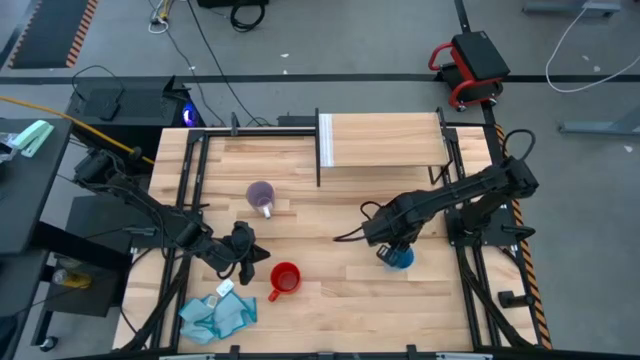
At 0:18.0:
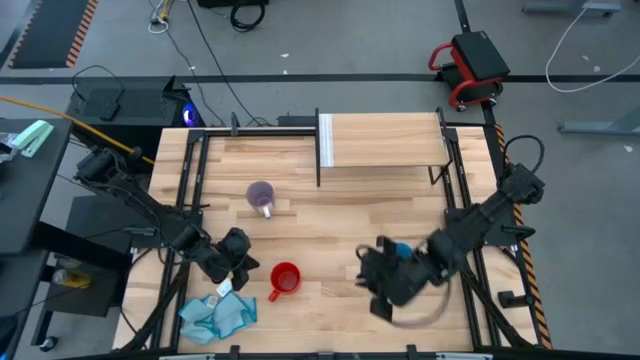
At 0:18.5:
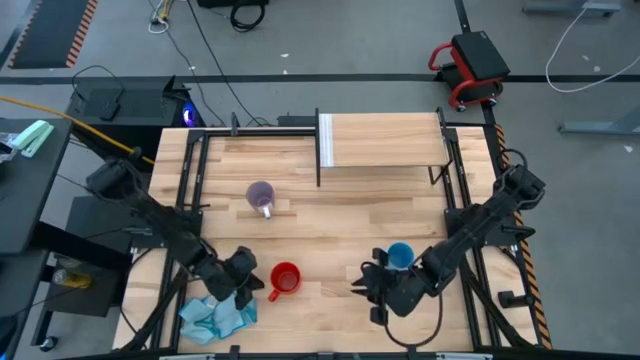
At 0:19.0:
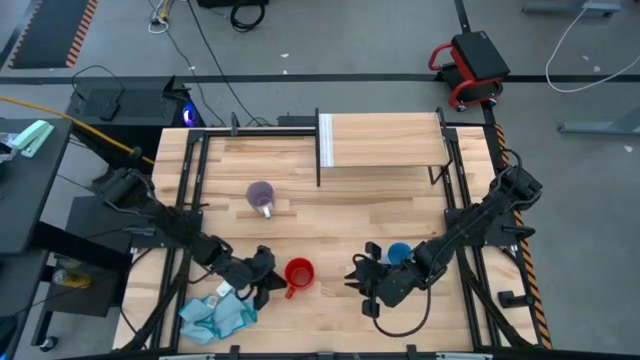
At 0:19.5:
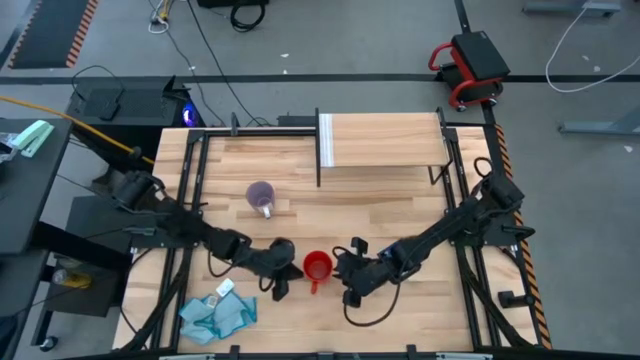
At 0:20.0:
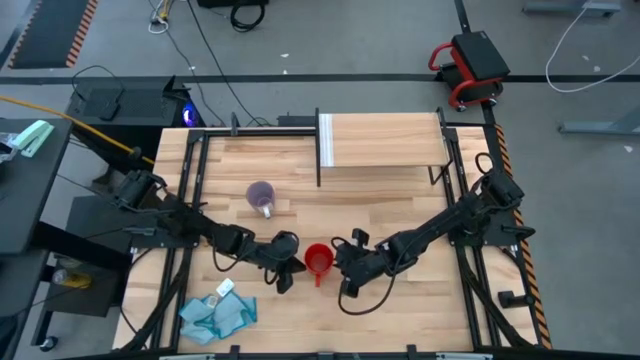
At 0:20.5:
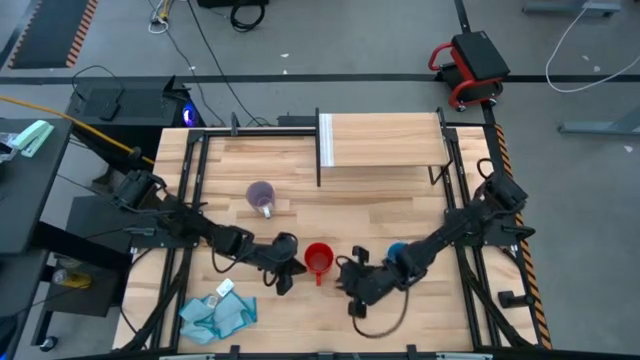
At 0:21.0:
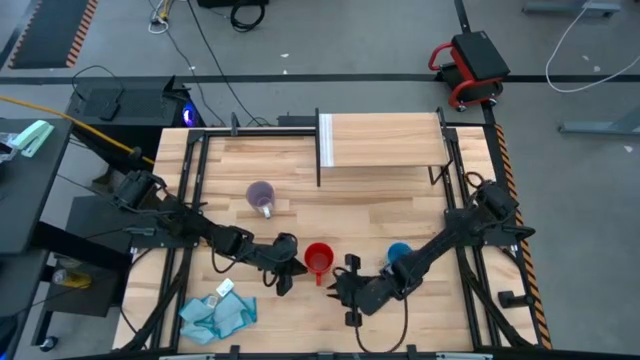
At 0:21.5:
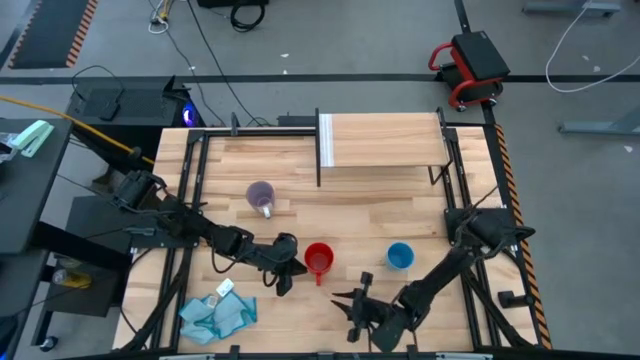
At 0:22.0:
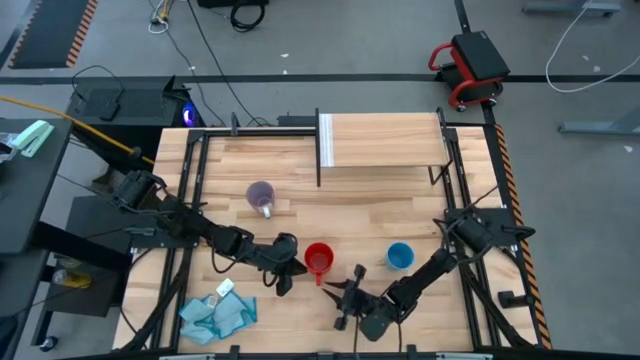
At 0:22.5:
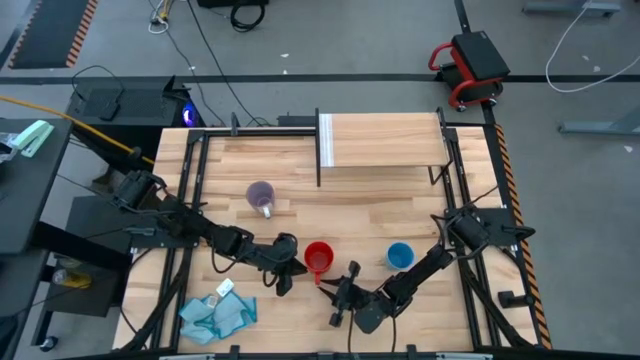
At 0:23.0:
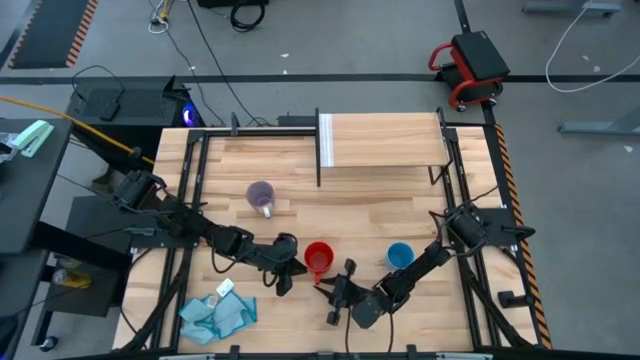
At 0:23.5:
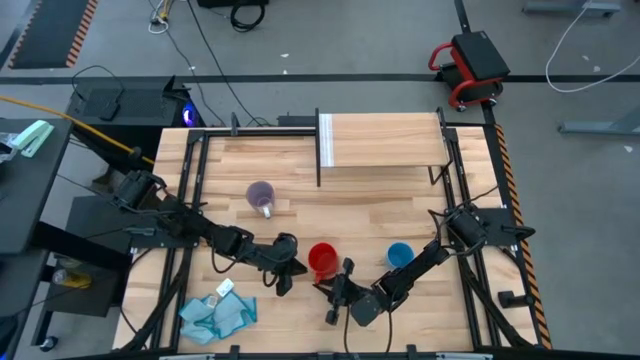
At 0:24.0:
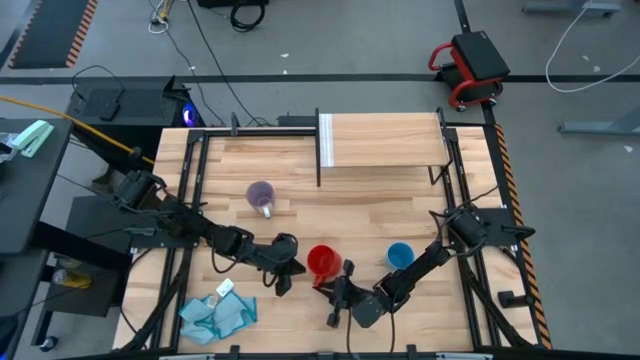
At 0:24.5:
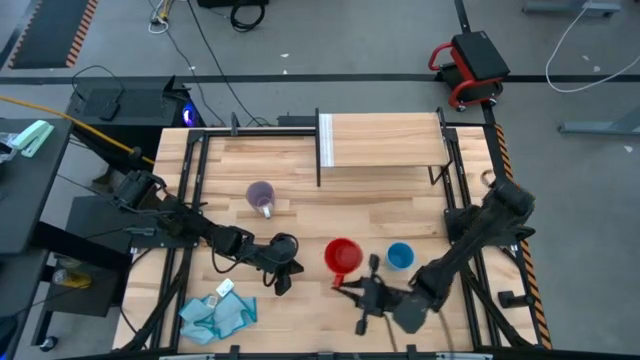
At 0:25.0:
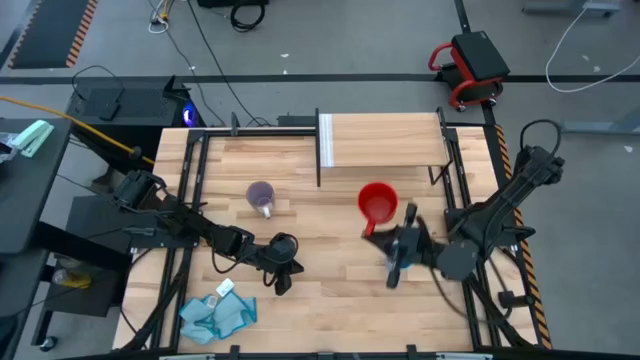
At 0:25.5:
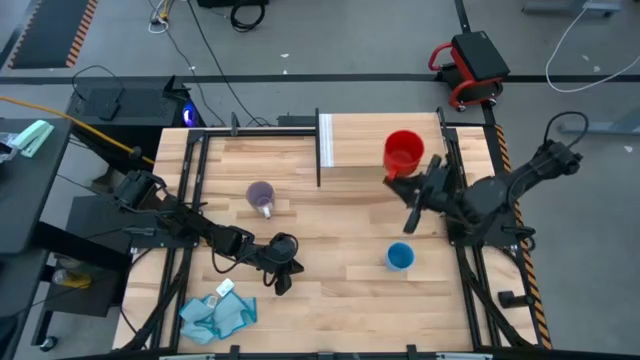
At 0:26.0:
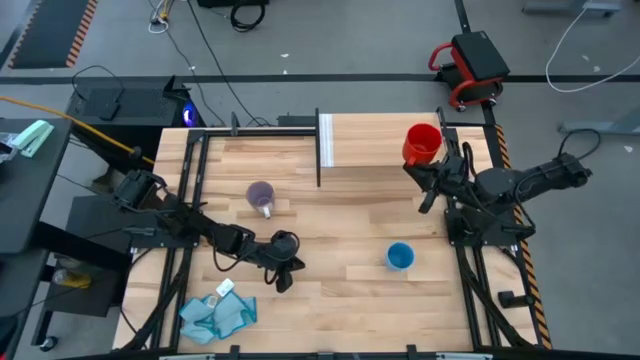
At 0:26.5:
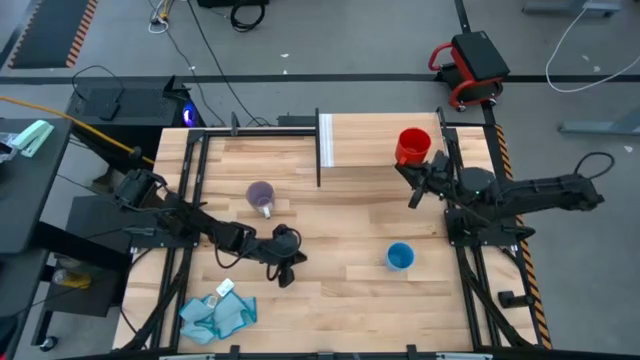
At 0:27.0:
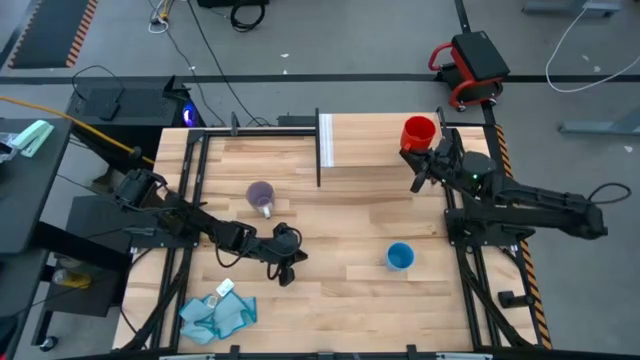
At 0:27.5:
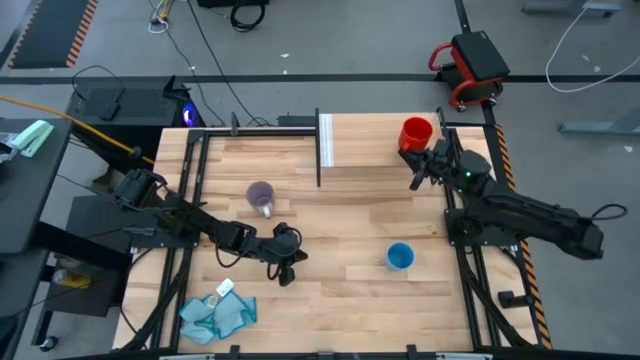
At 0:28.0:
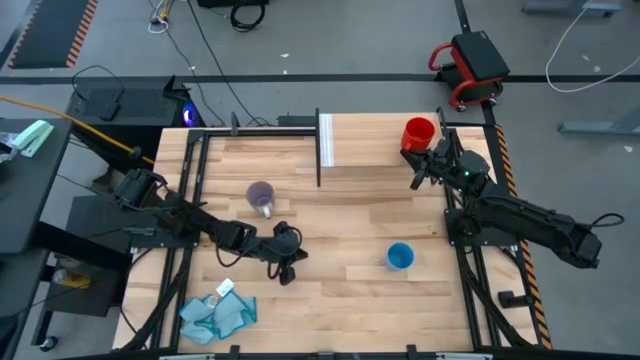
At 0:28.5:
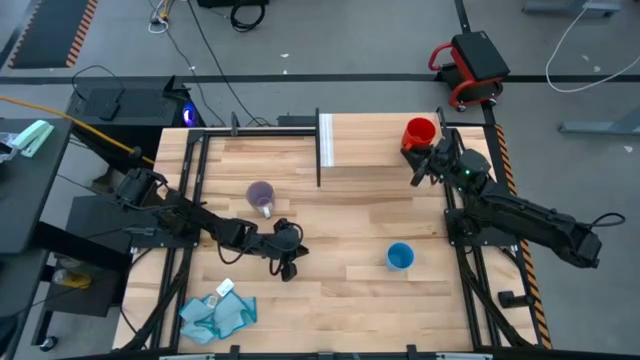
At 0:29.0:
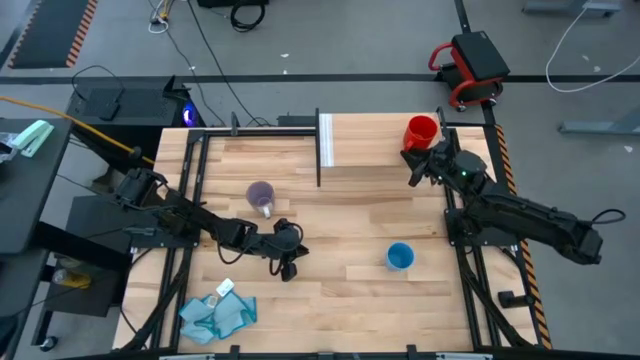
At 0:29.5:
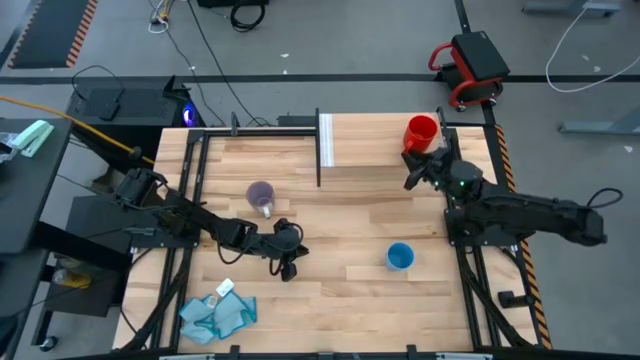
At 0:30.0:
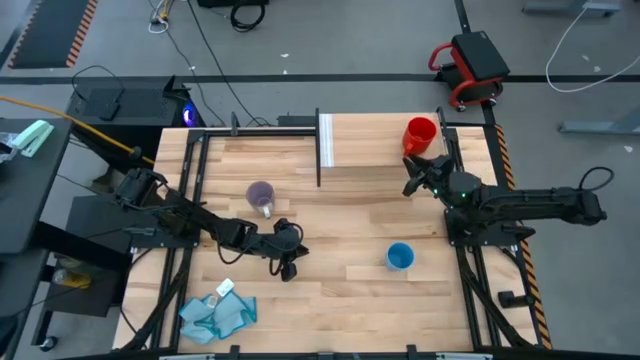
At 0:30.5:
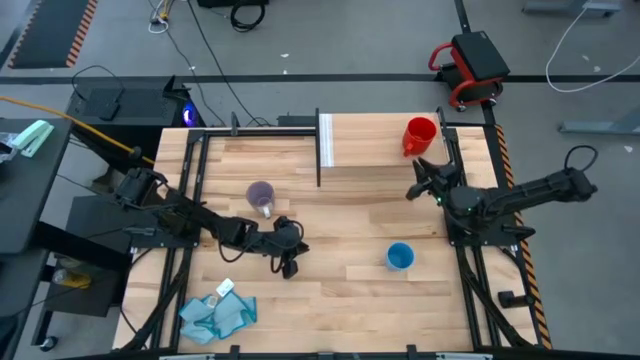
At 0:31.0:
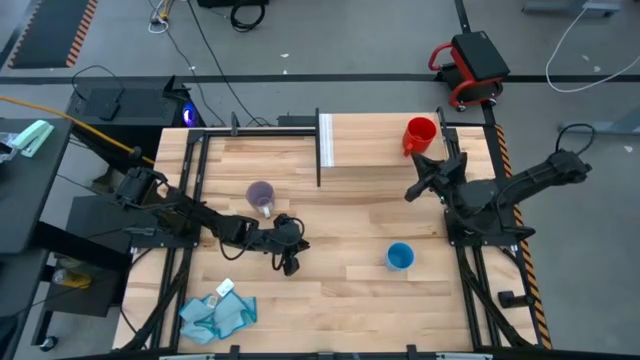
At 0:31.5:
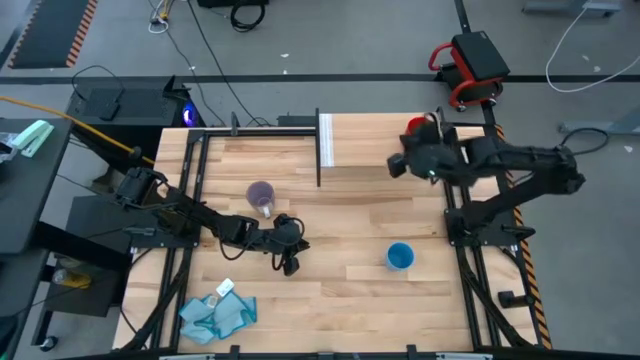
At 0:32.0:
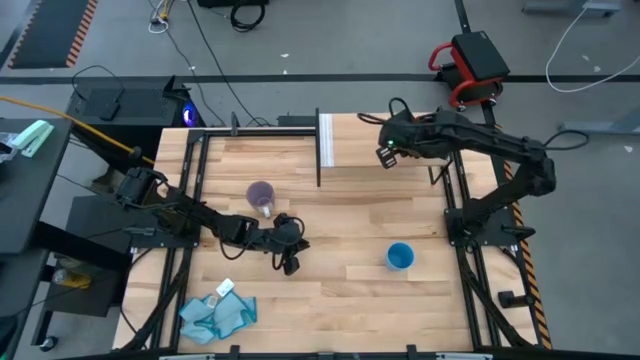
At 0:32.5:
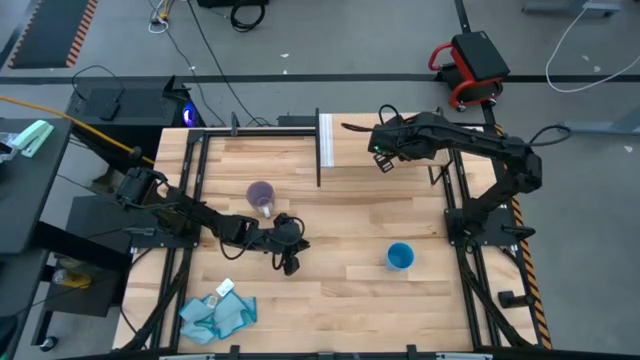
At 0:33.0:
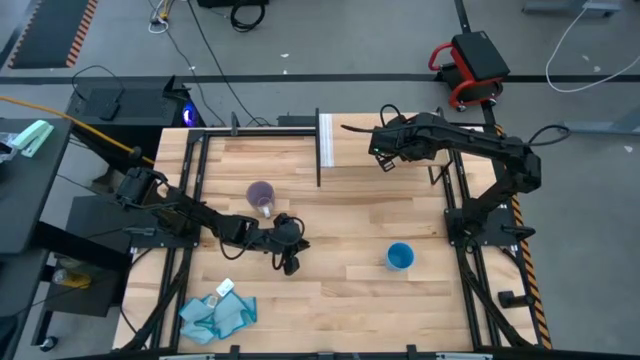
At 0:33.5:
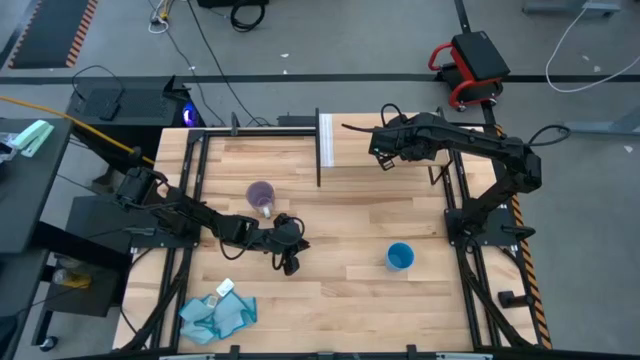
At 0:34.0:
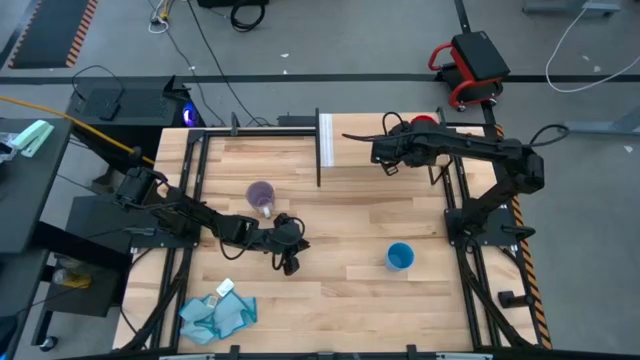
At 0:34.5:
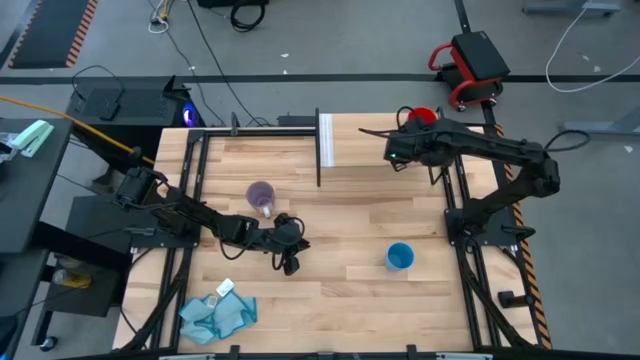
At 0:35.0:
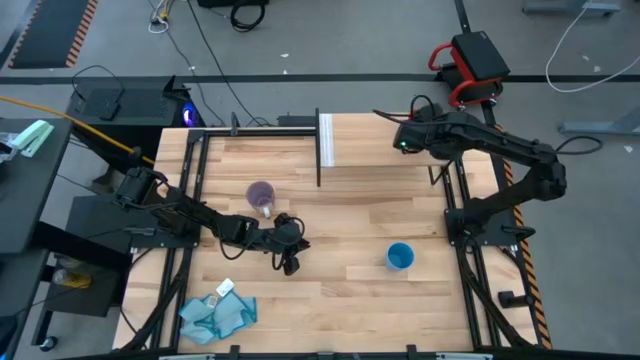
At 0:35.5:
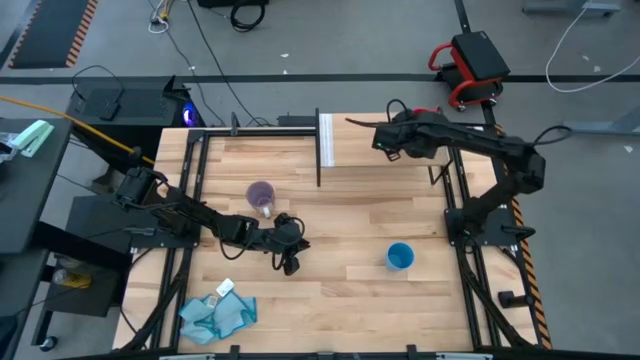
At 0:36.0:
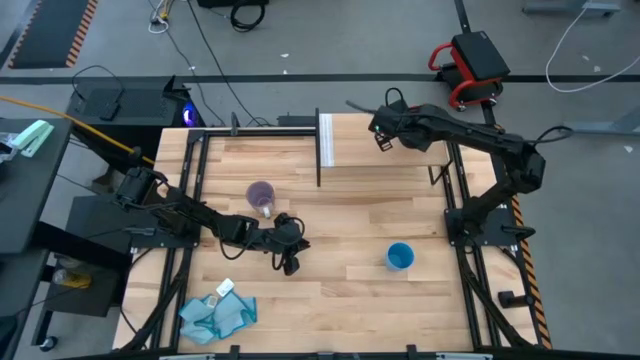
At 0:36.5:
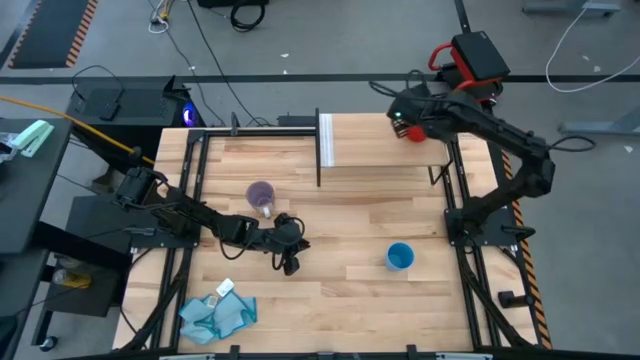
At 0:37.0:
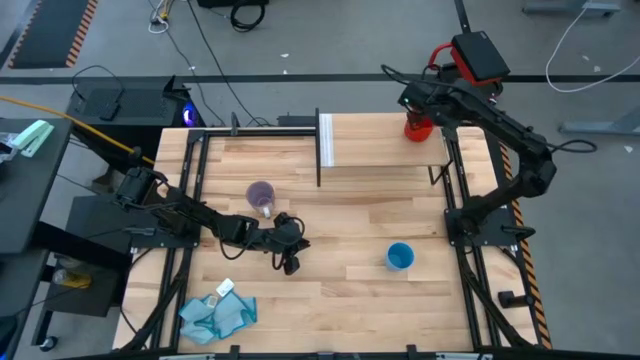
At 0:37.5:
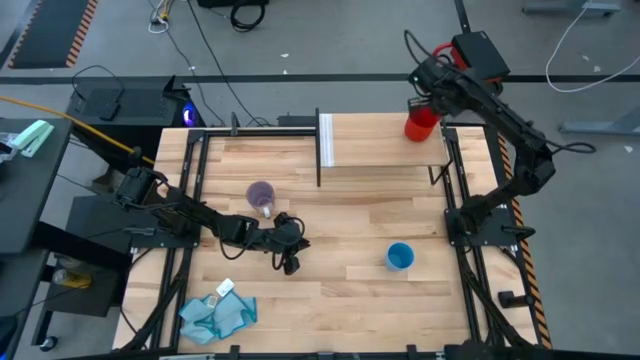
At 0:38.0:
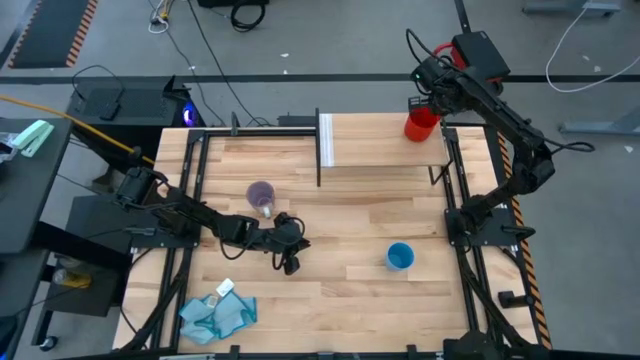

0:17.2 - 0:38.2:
Task: Stack small to large cups/mugs on shelf
Put the red mug on the shelf
